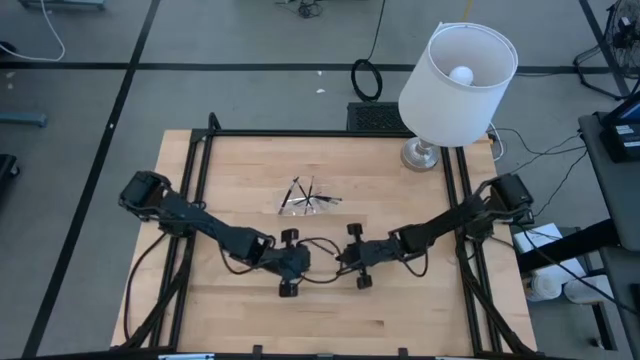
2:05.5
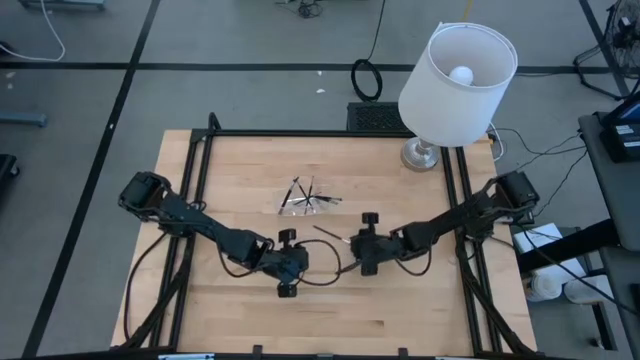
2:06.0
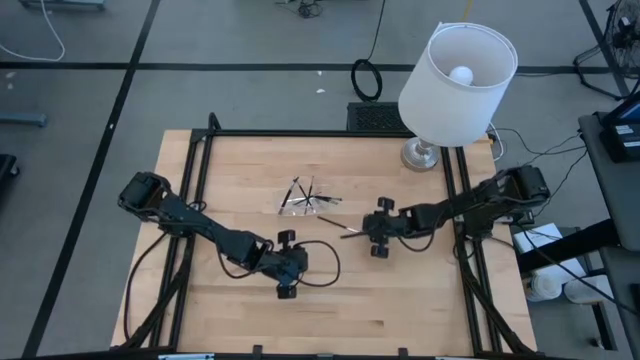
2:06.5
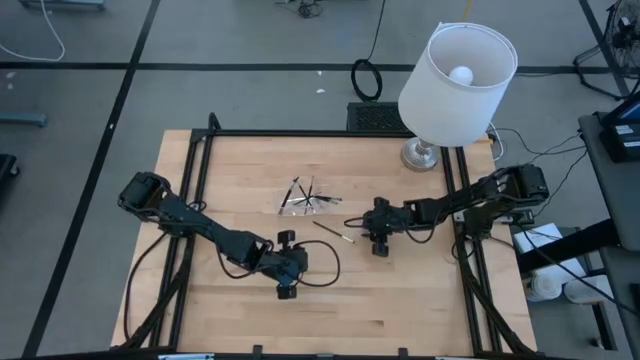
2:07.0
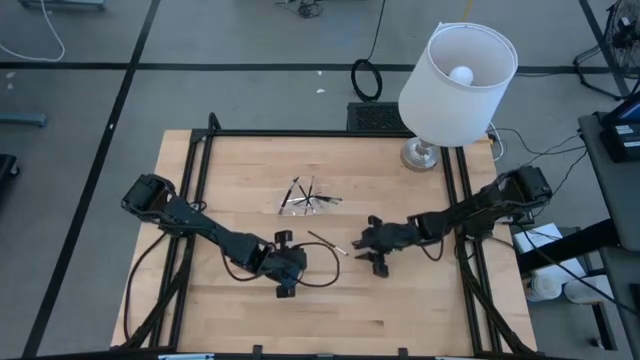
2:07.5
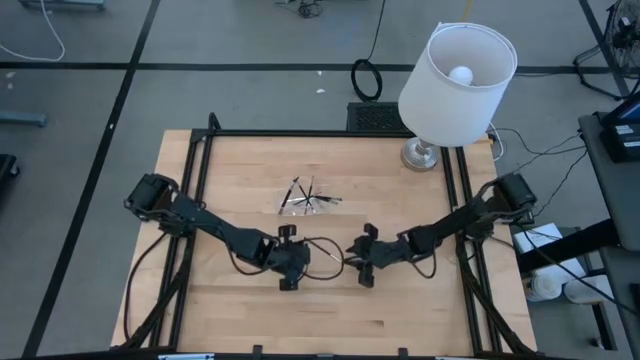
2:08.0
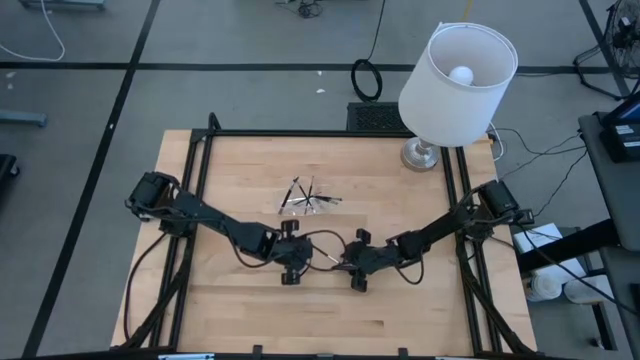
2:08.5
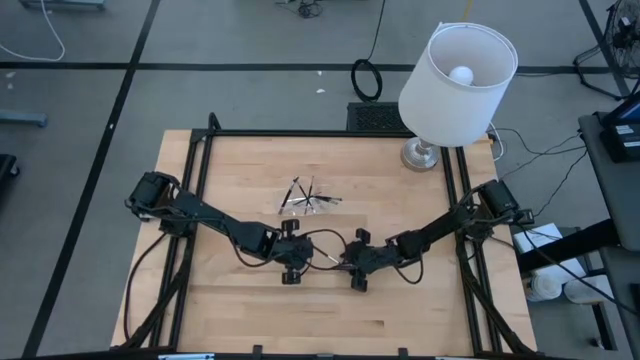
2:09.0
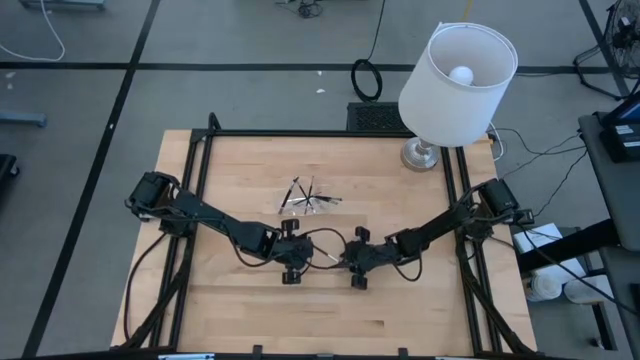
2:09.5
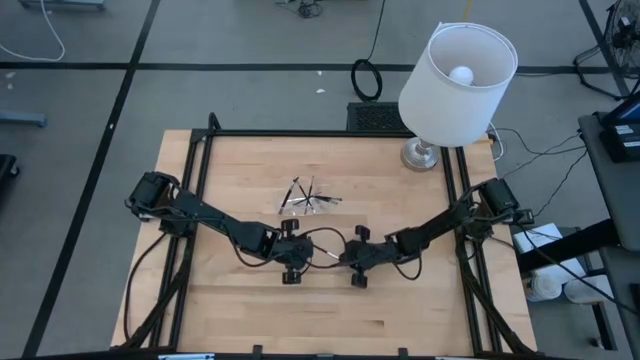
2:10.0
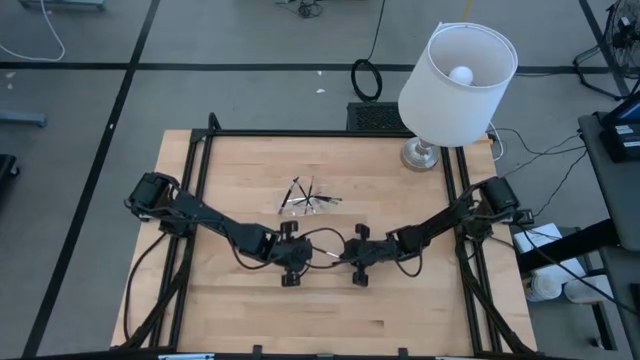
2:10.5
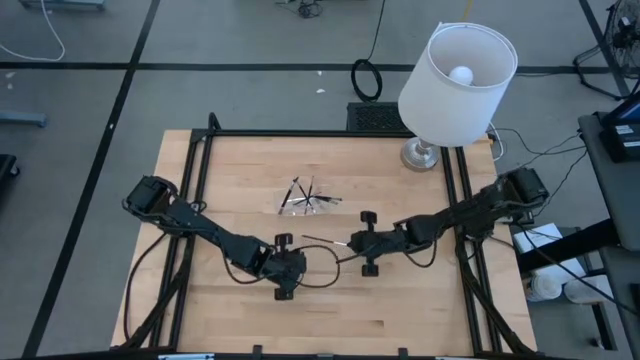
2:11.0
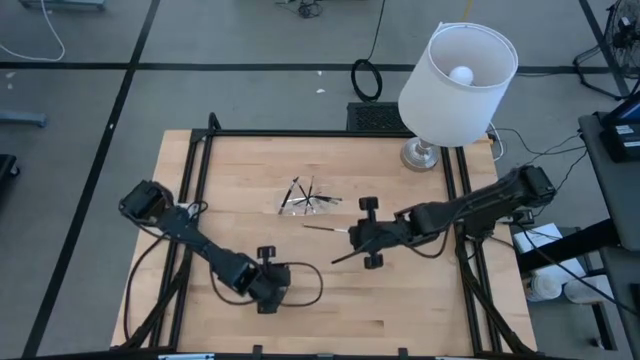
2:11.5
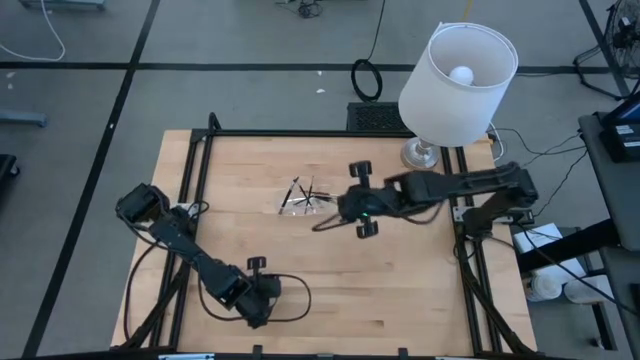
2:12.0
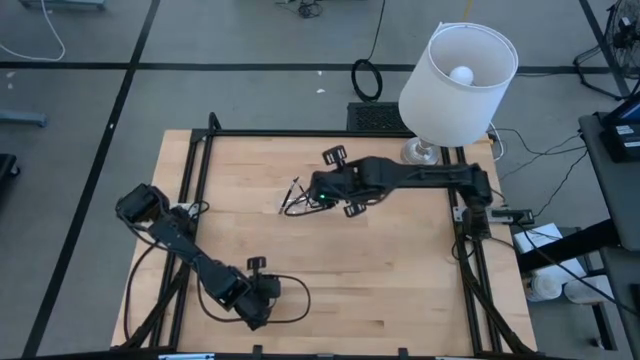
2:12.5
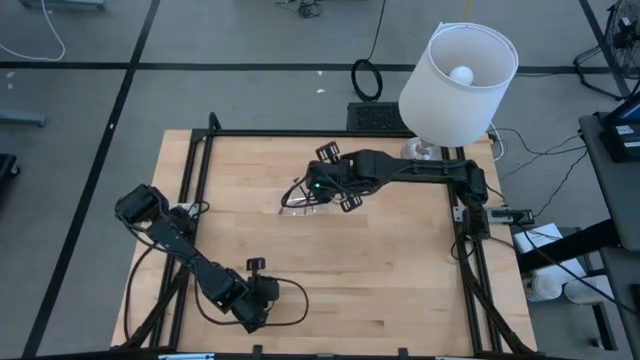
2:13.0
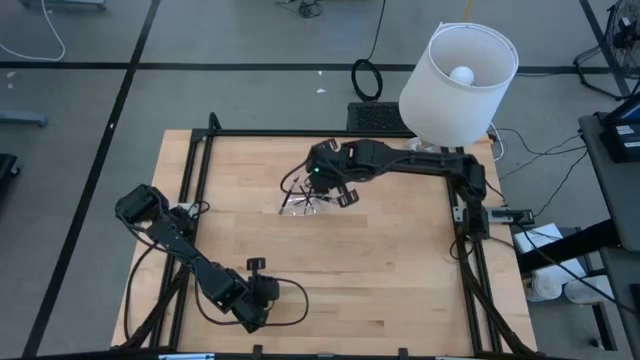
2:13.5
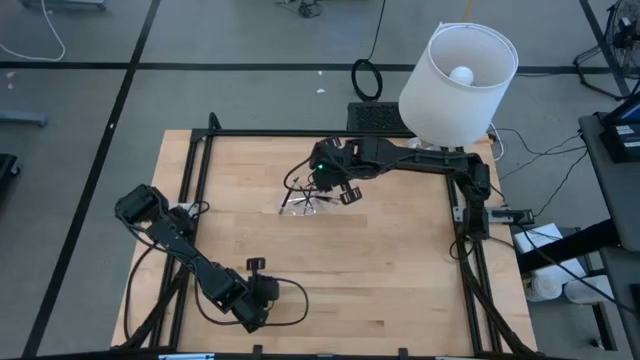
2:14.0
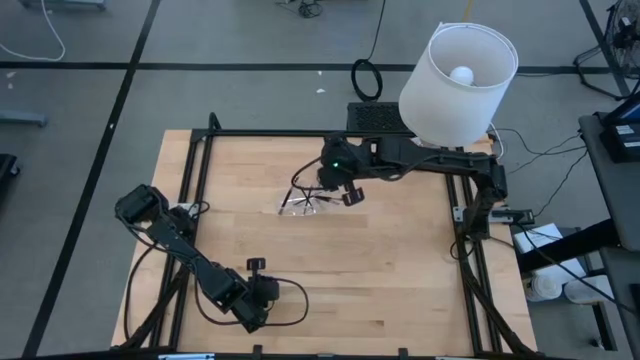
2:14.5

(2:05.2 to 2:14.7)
Task: Put items in baskets/containers
Put the black eyeshadow brush into the transparent organizer

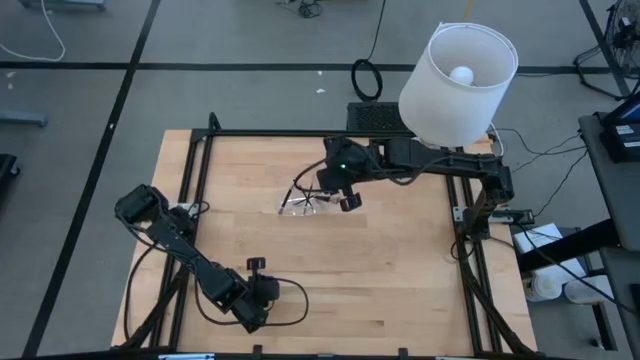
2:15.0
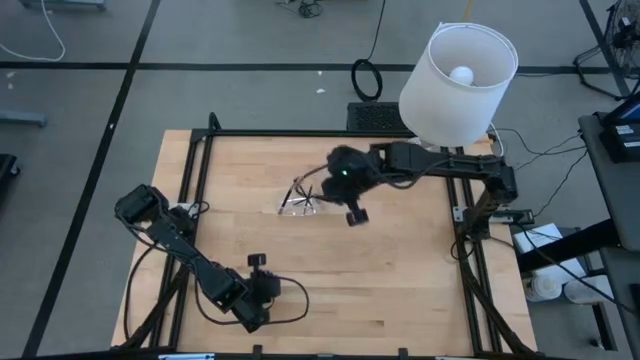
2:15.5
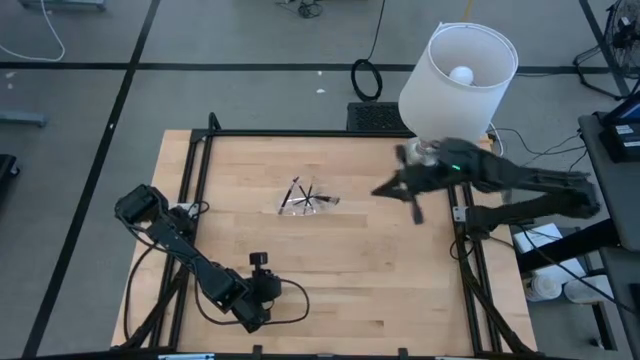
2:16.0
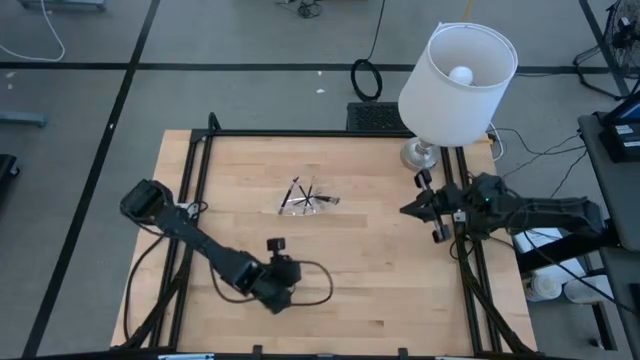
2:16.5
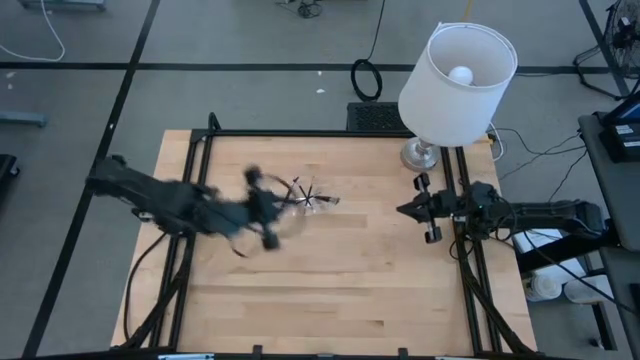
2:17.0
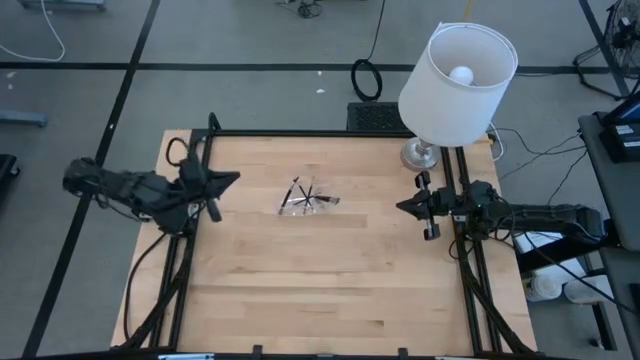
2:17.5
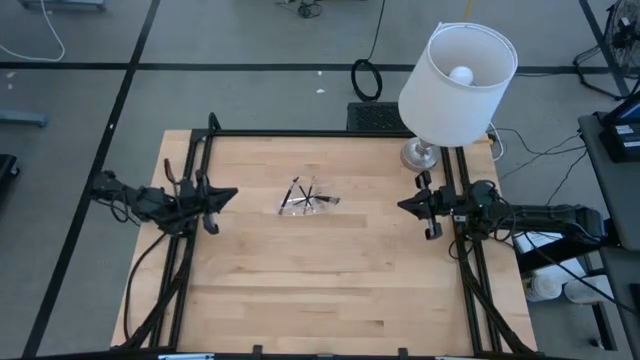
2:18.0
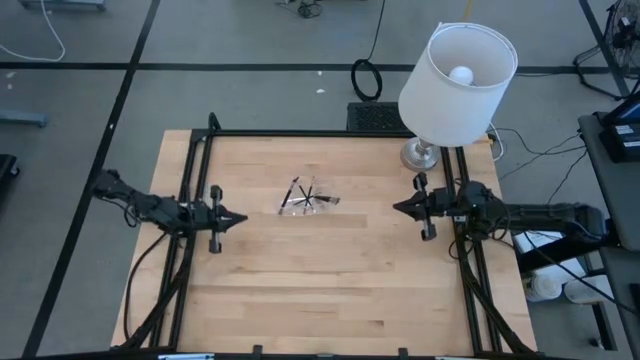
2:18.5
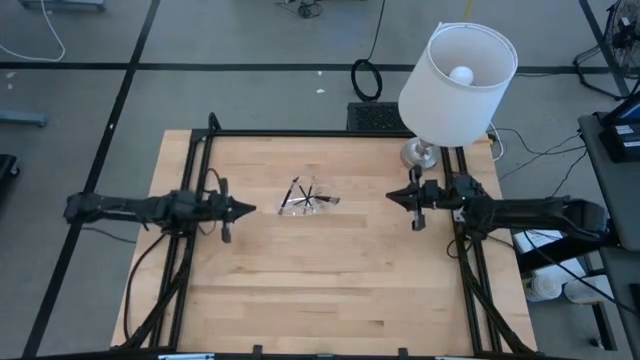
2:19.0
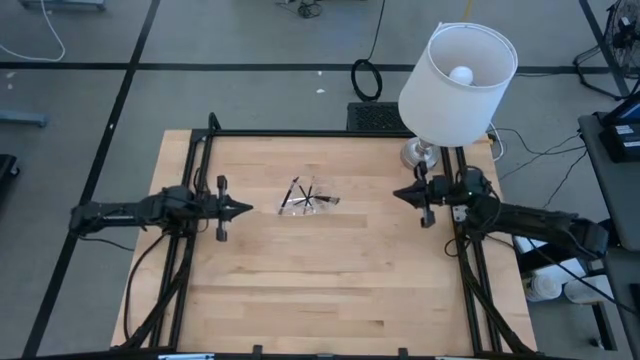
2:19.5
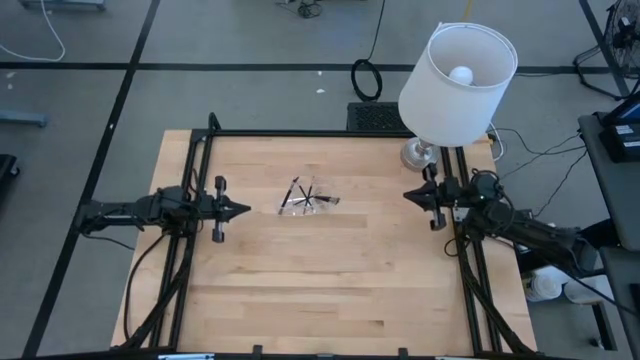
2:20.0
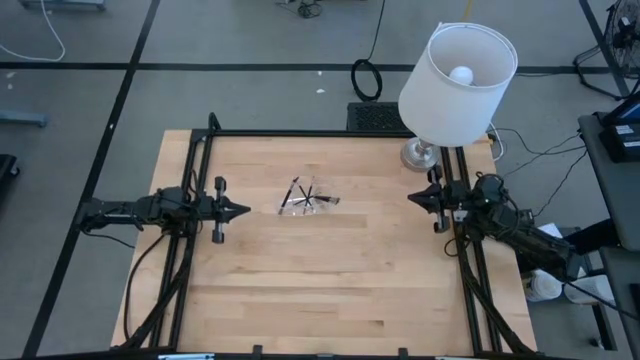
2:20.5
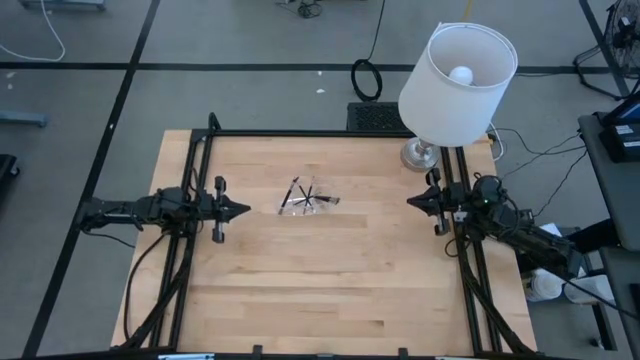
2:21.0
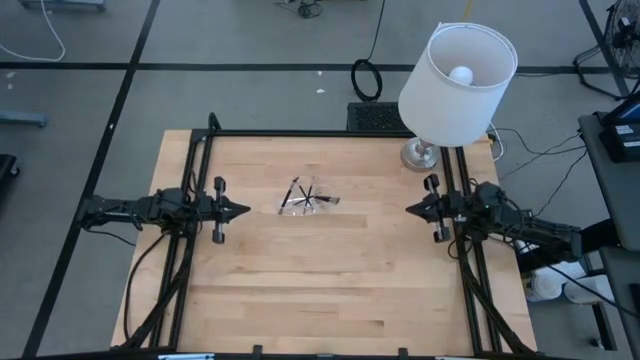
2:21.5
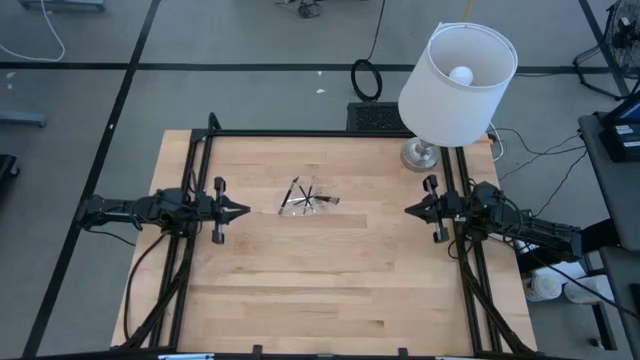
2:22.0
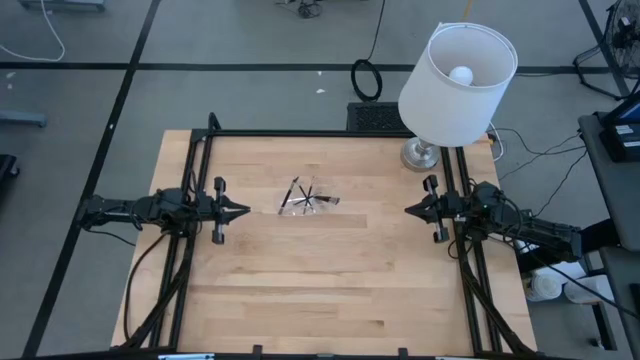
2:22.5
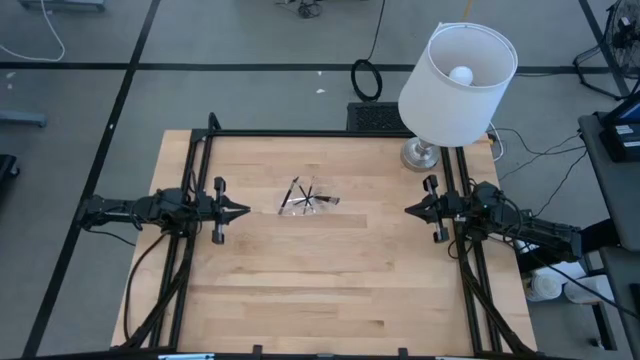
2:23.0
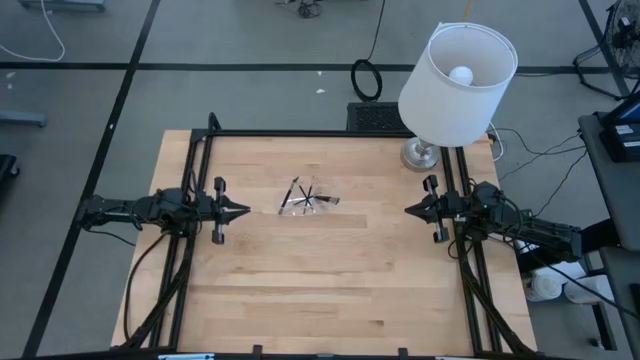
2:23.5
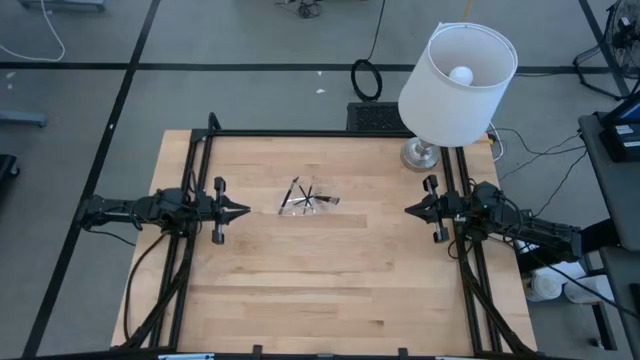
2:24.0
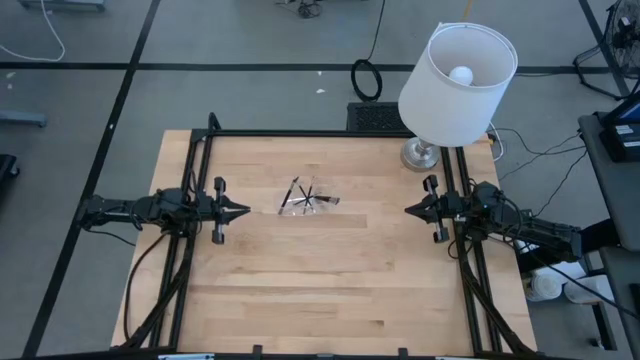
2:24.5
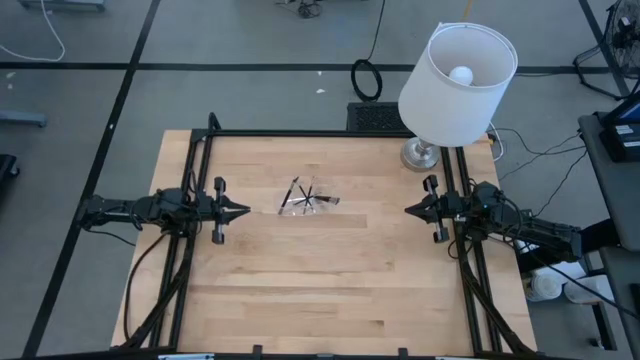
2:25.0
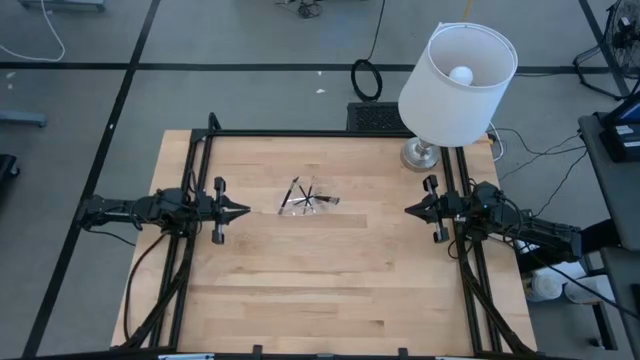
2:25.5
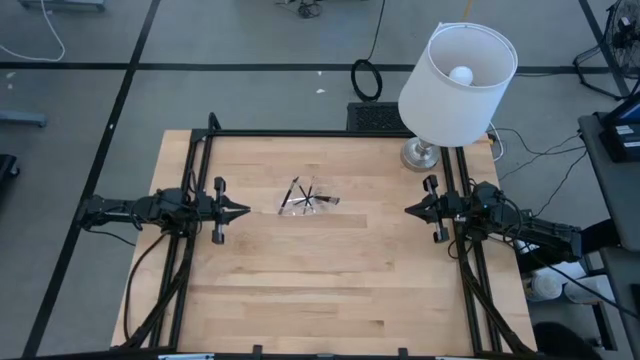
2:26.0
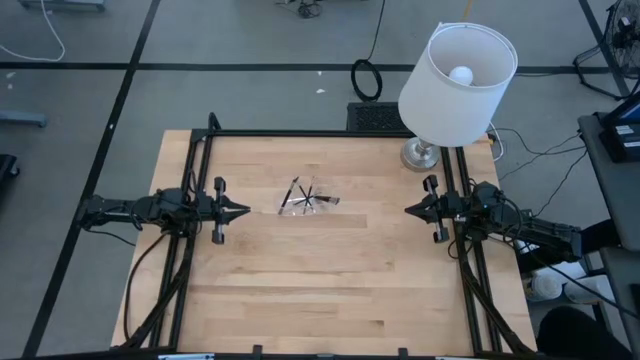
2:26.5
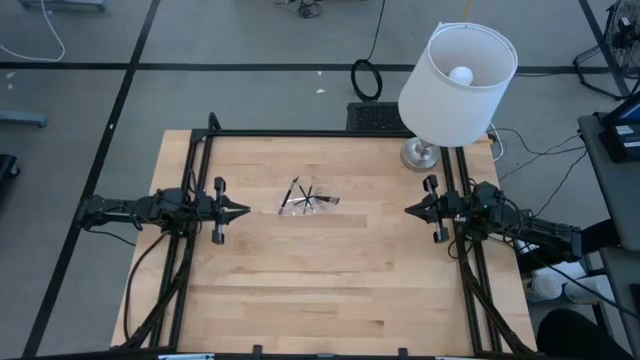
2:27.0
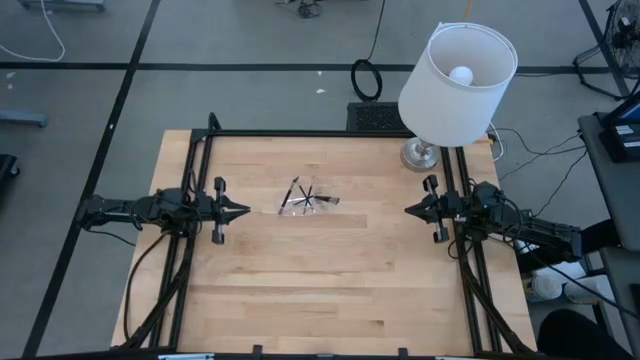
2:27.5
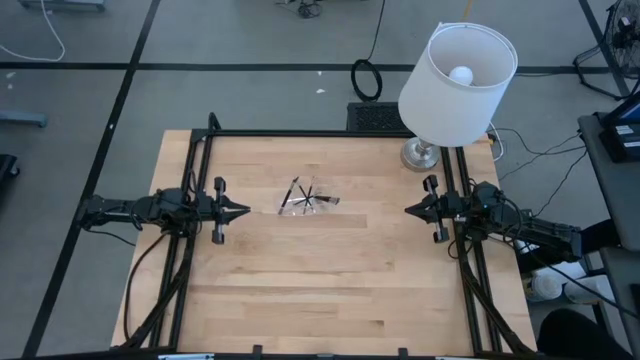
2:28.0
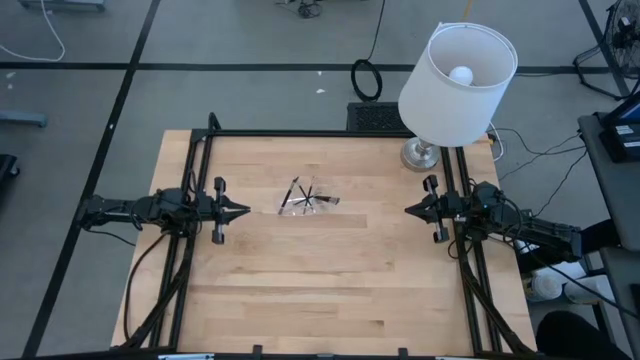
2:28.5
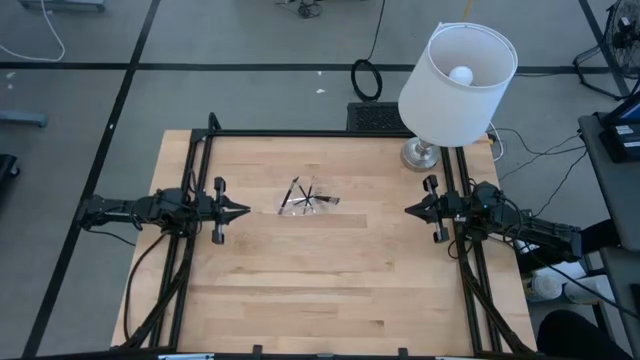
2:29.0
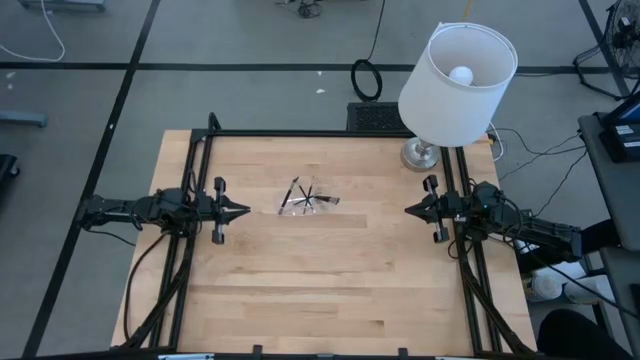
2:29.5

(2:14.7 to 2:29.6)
Return to Home Position
